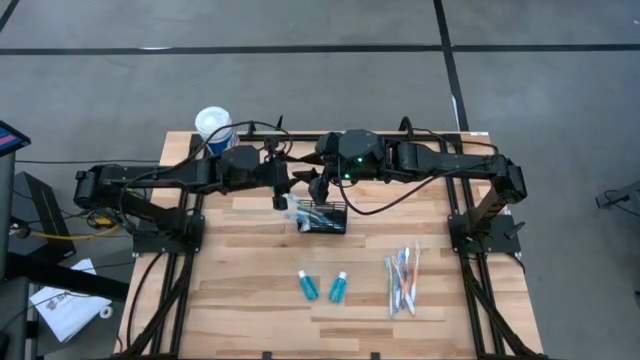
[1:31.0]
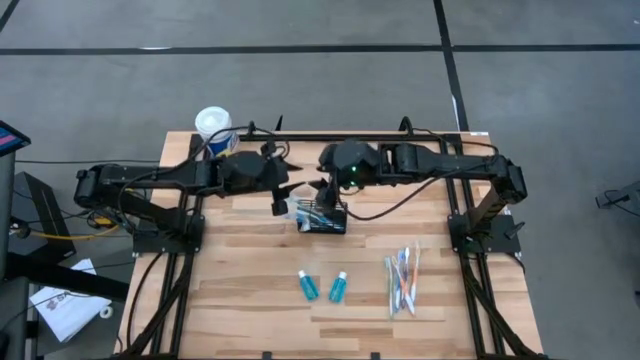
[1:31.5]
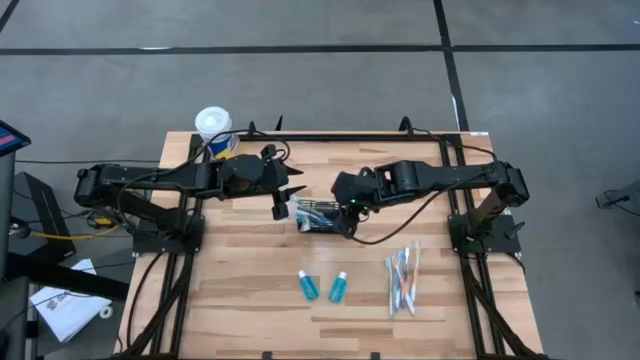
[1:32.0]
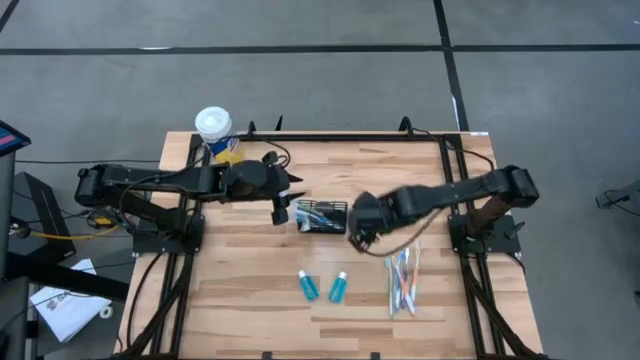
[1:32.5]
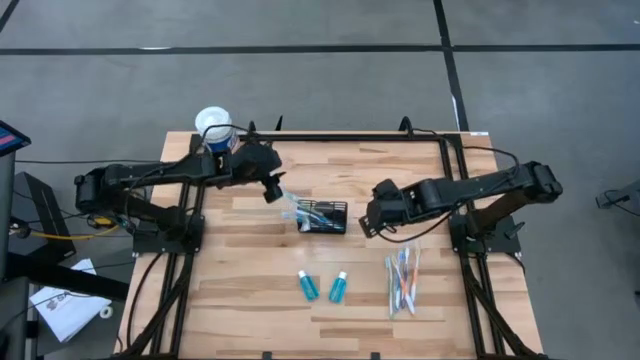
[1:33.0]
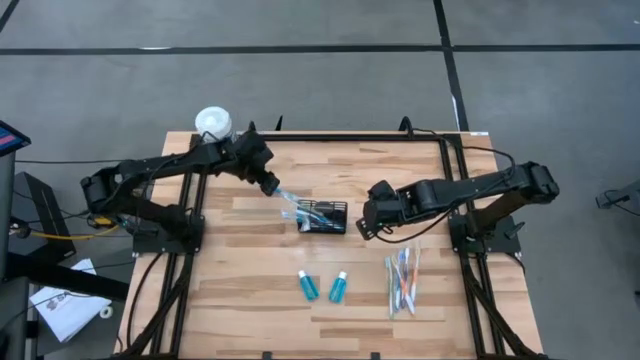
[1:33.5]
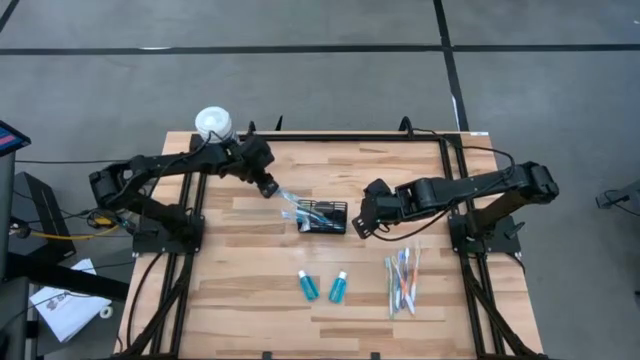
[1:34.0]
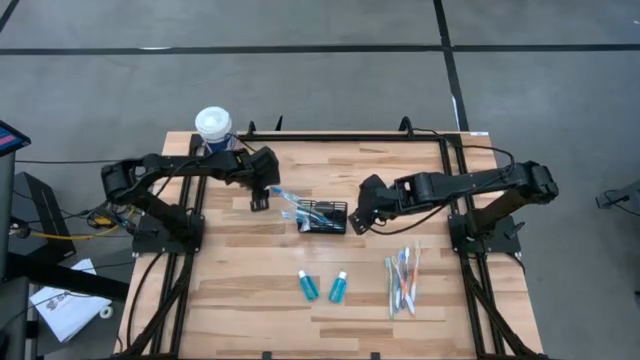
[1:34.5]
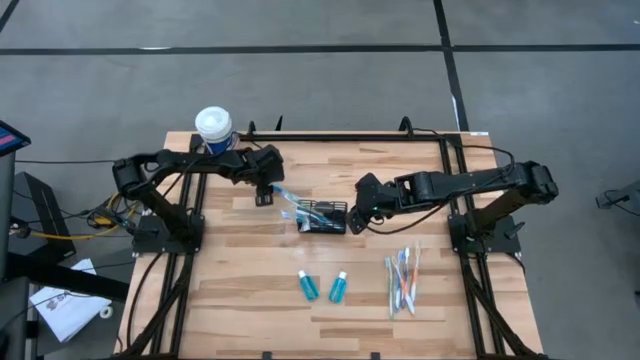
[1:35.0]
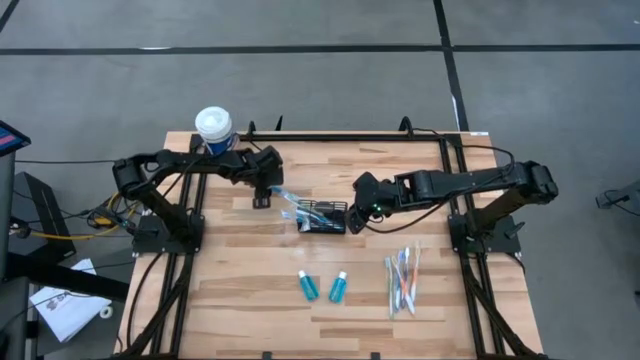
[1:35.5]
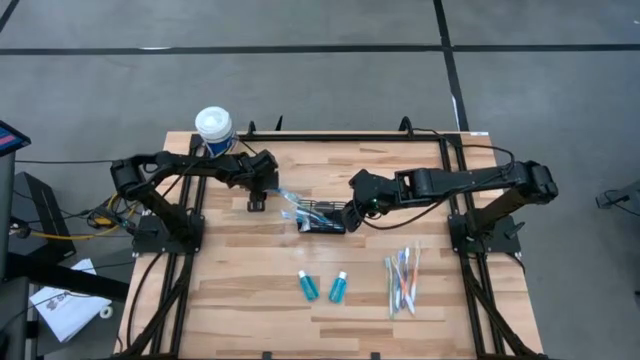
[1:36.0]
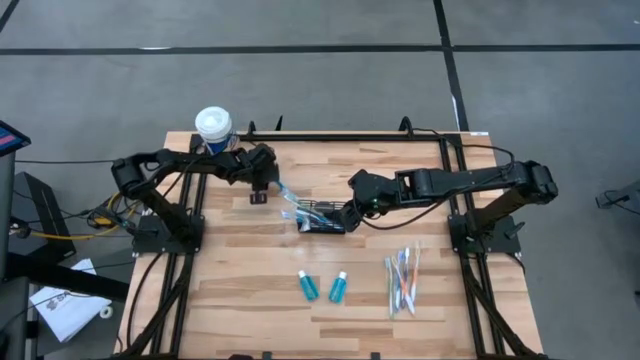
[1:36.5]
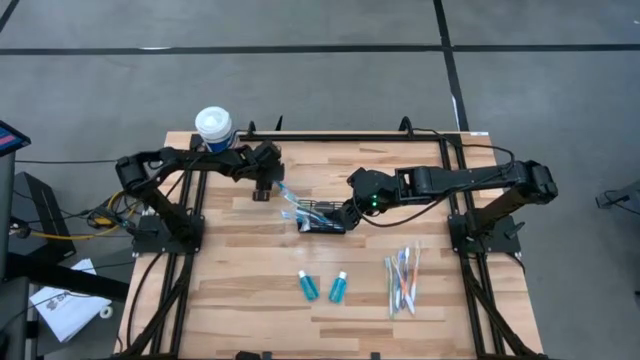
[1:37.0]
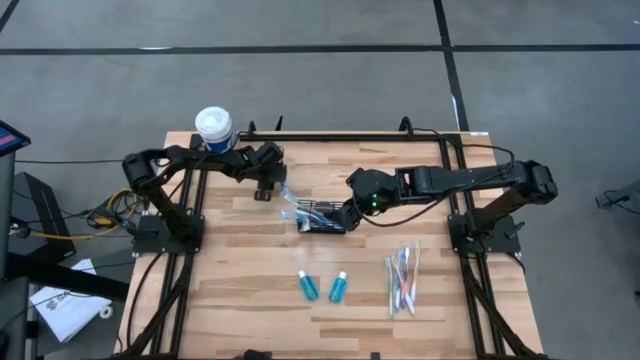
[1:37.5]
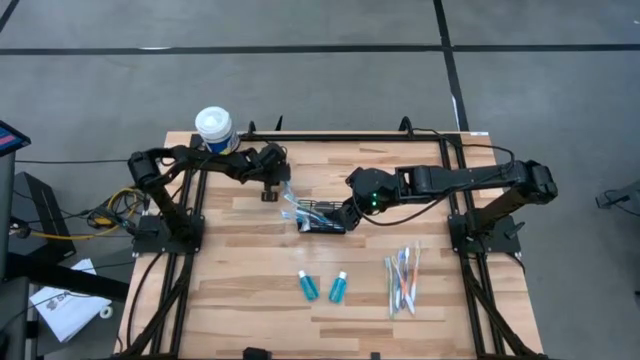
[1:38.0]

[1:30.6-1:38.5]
Task: Pick & Place toothbrushing station
Put the blue toothbrush into the mesh

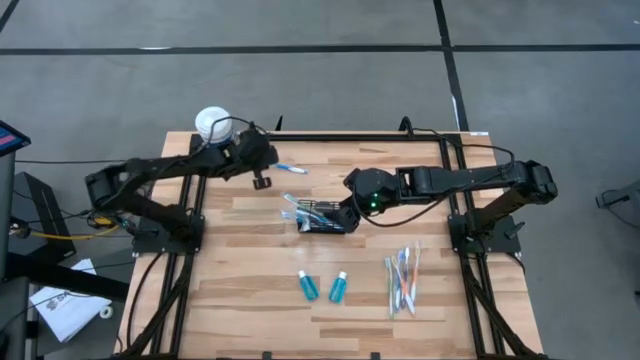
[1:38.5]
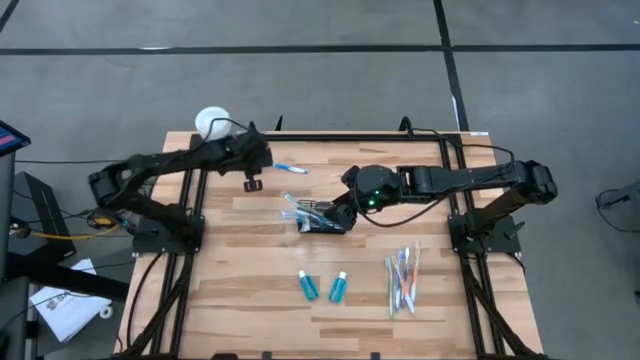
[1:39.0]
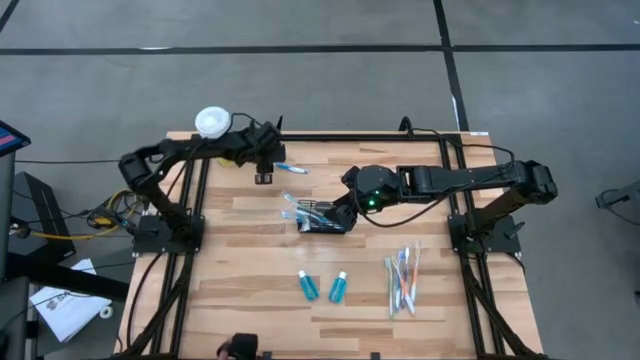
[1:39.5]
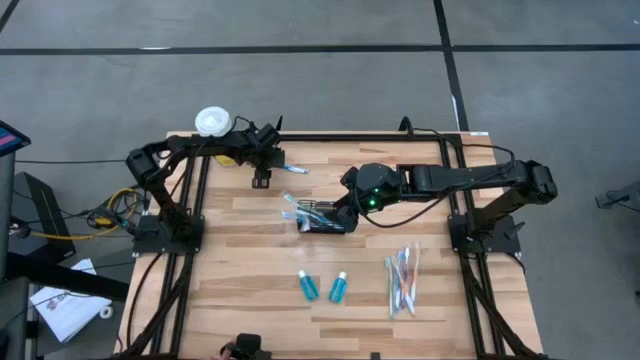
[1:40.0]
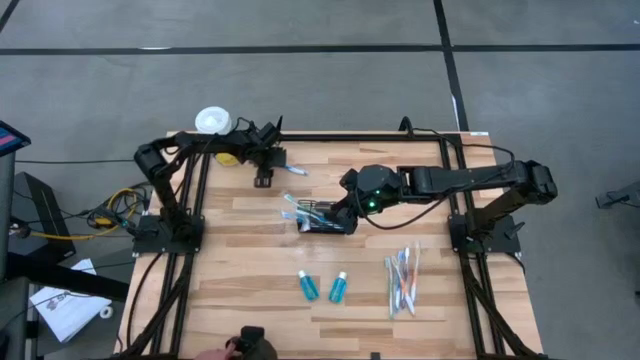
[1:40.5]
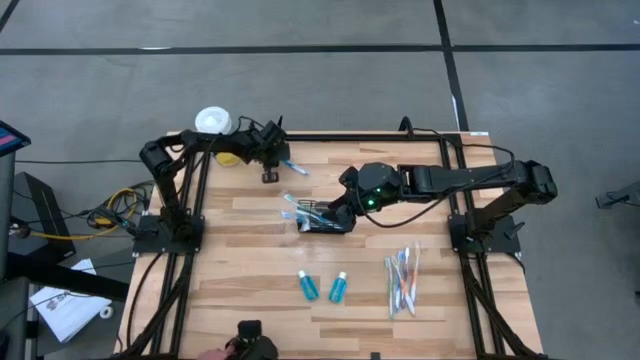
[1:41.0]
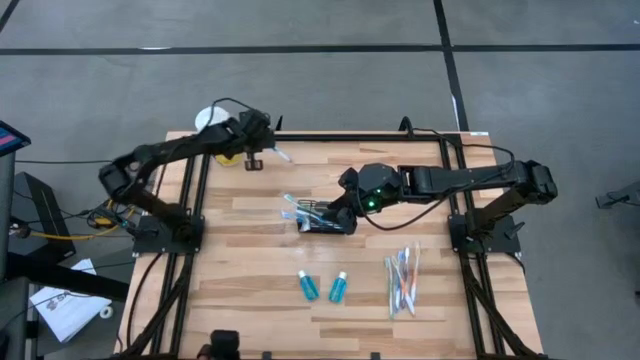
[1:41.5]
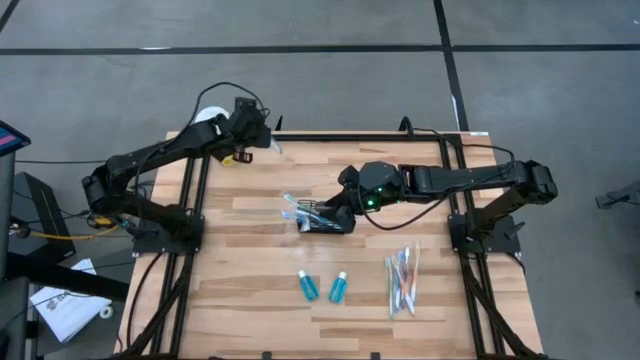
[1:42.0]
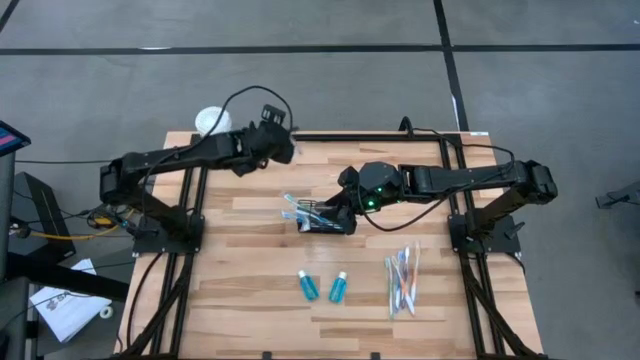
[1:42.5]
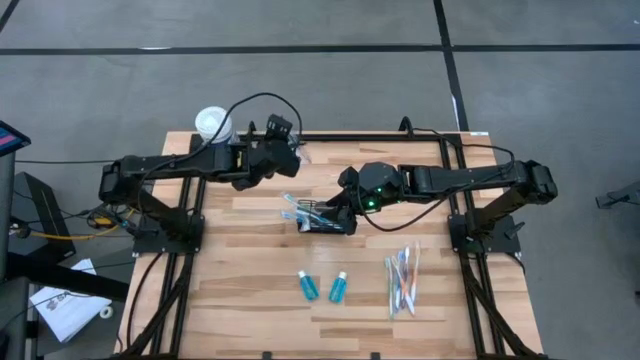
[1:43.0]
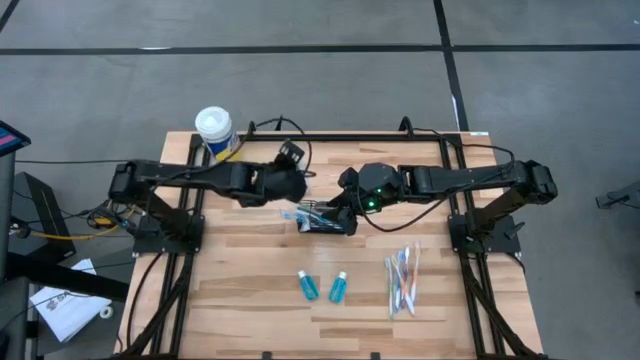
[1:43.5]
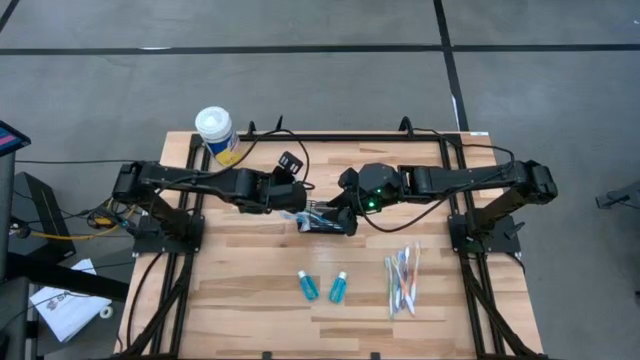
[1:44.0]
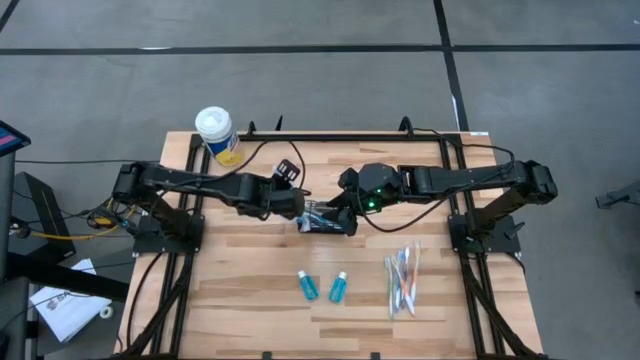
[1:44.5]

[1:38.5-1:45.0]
Put the blue toothbrush into the mesh

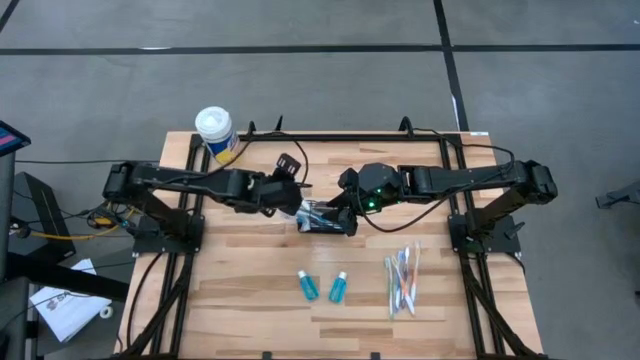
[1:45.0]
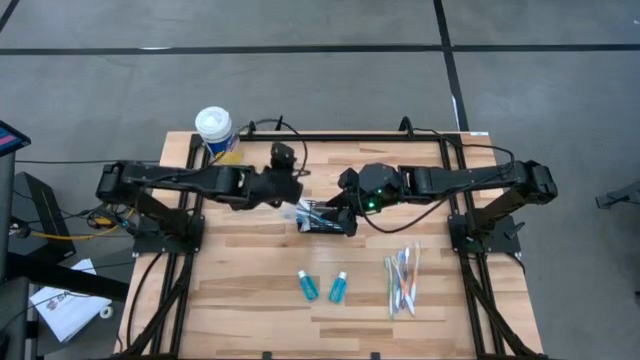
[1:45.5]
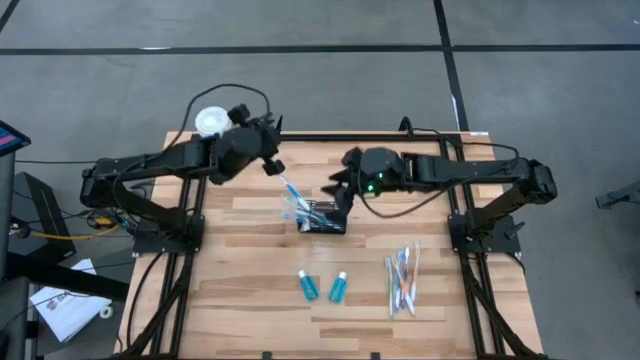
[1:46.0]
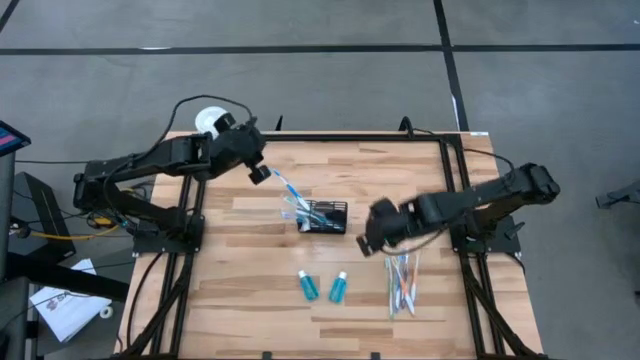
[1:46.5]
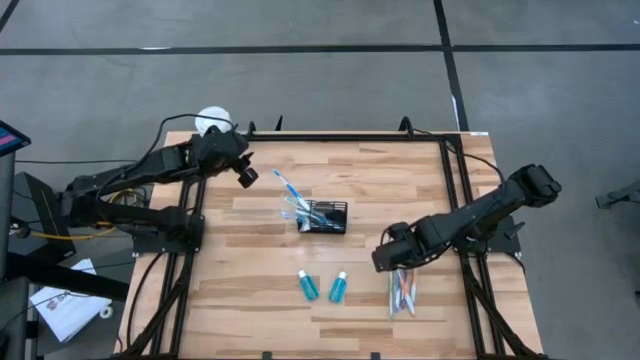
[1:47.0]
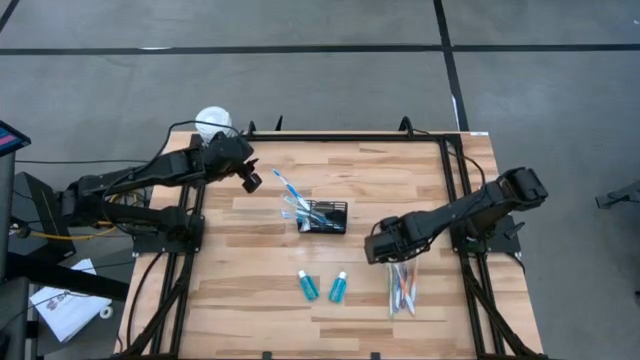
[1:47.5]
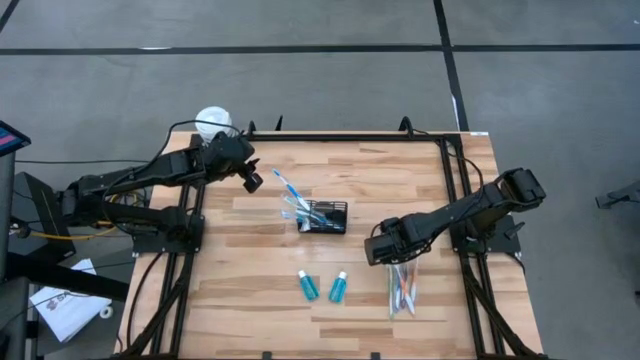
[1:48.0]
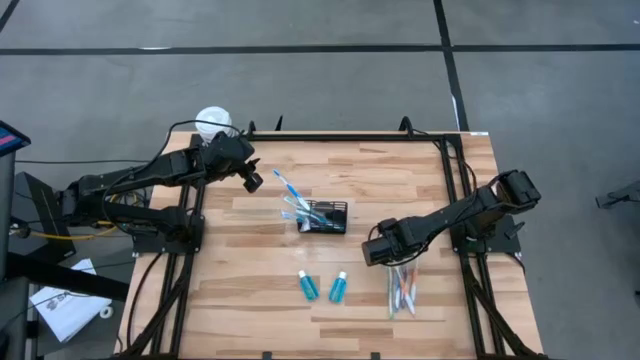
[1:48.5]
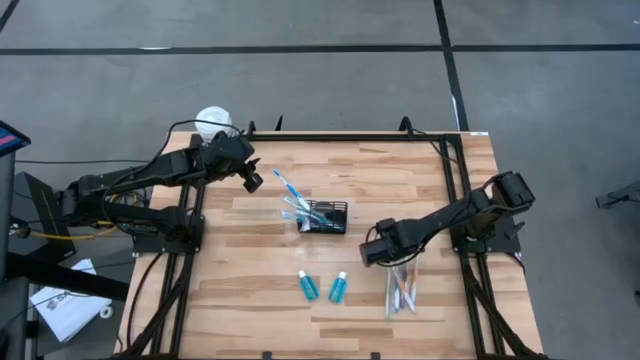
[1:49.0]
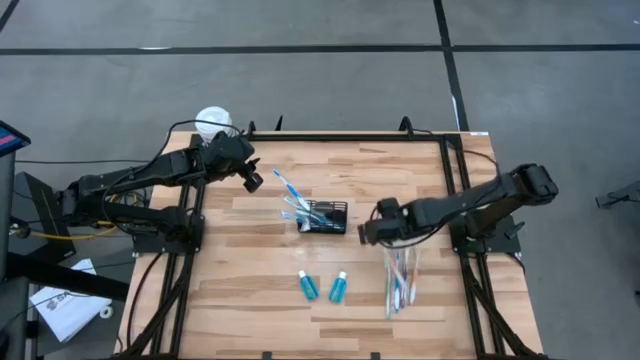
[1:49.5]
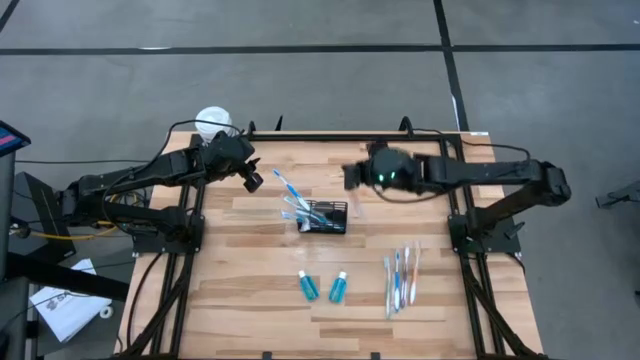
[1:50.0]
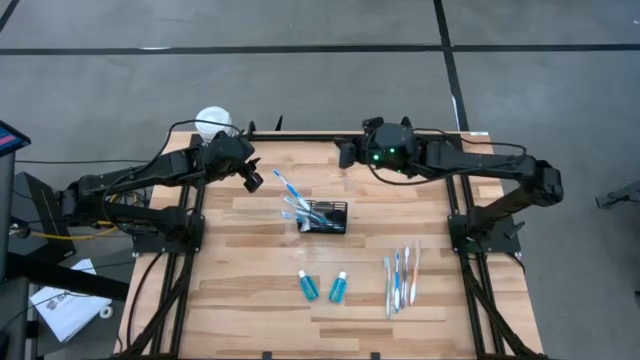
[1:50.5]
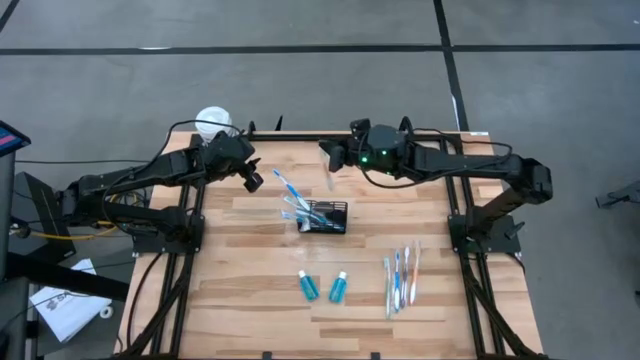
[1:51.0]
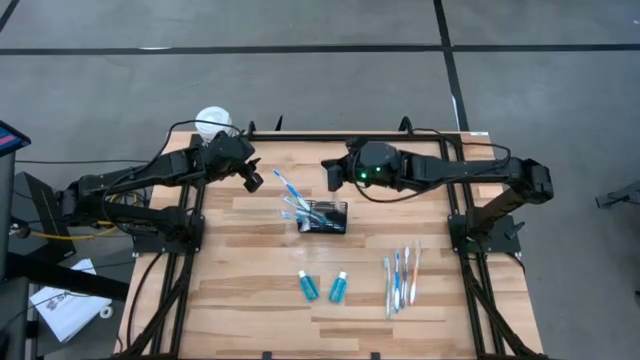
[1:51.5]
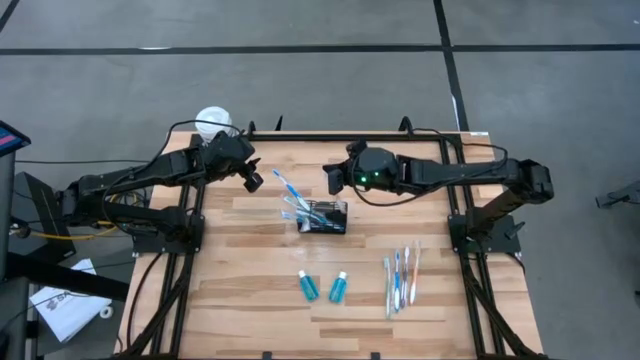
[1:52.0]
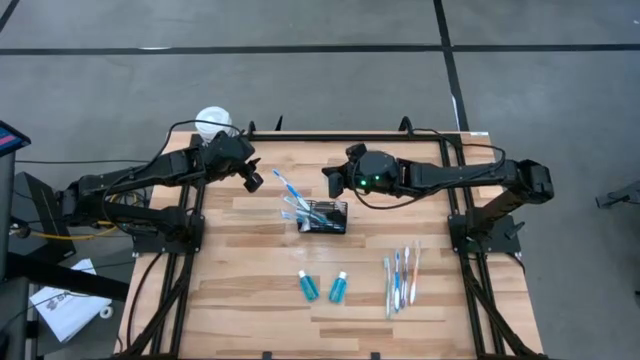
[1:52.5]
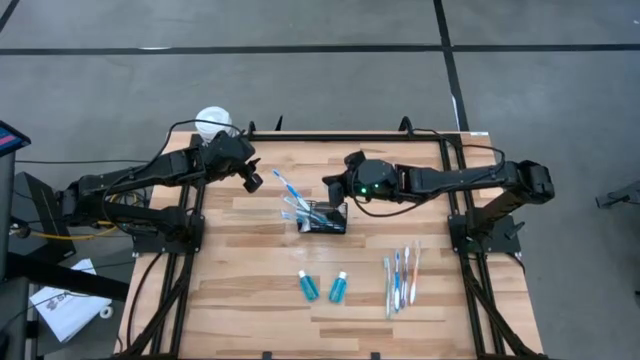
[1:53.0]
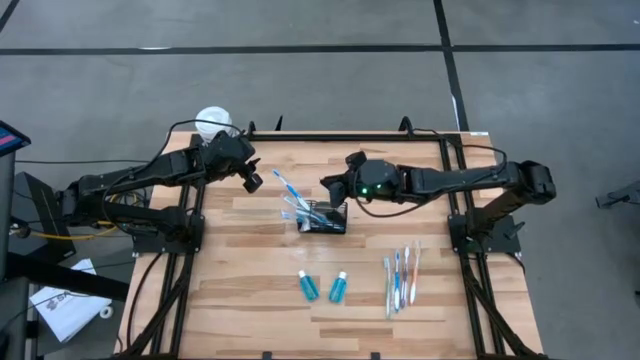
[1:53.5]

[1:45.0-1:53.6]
Put the orange toothbrush into the mesh
